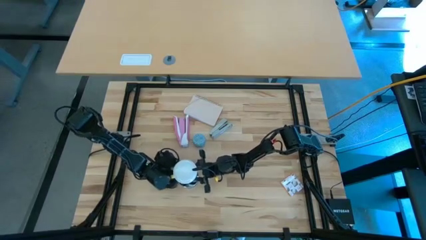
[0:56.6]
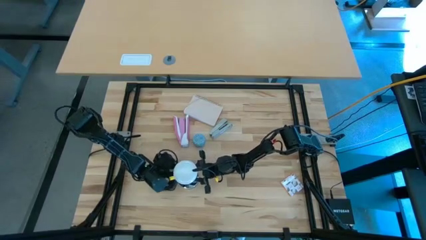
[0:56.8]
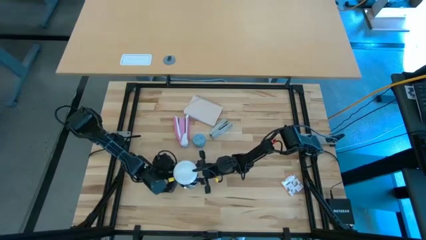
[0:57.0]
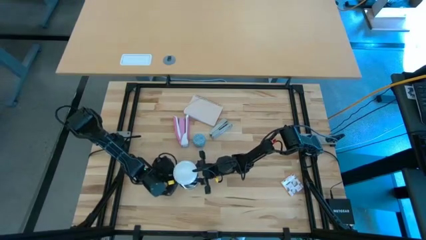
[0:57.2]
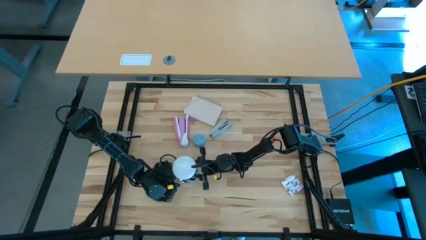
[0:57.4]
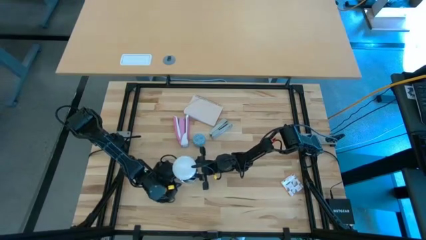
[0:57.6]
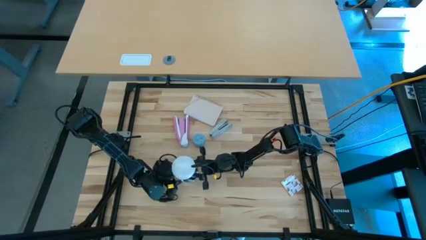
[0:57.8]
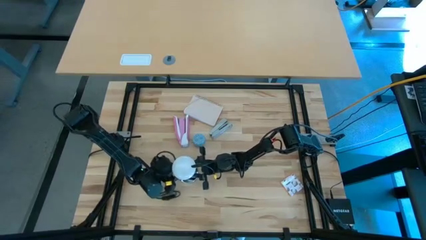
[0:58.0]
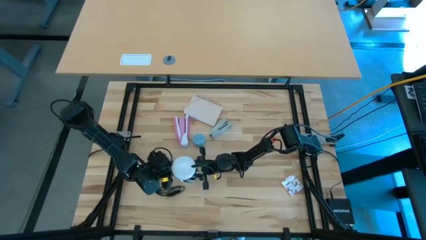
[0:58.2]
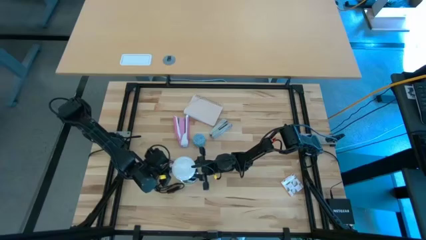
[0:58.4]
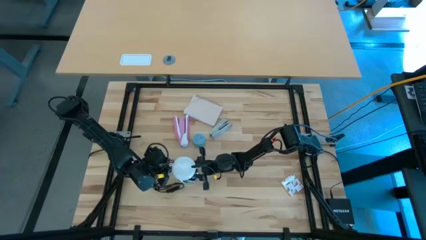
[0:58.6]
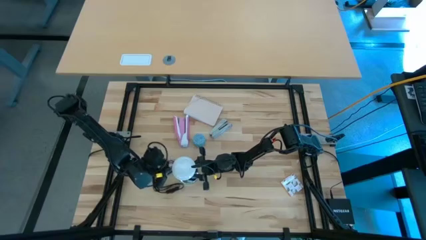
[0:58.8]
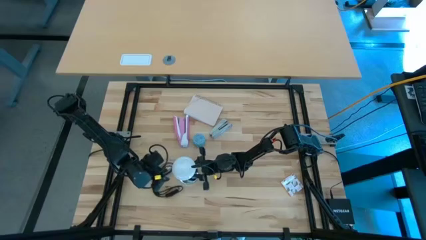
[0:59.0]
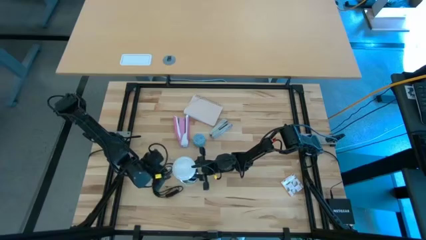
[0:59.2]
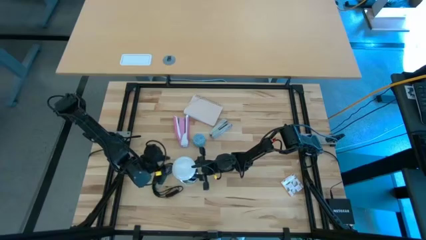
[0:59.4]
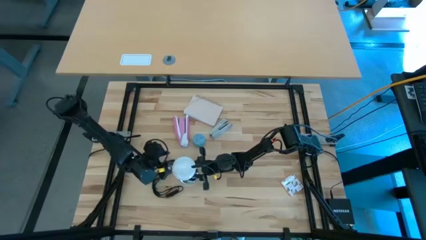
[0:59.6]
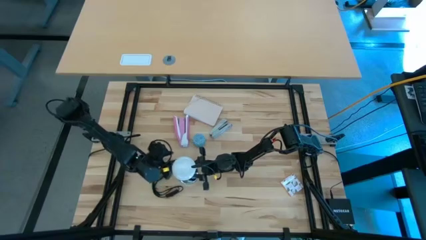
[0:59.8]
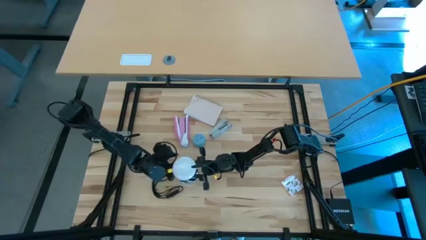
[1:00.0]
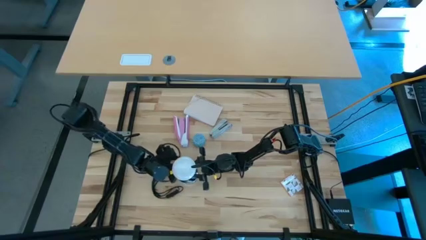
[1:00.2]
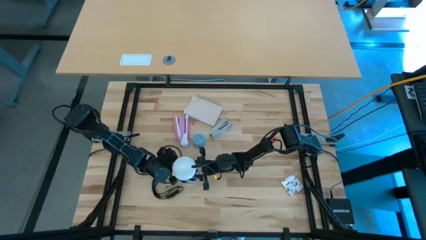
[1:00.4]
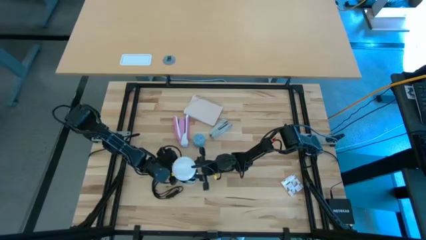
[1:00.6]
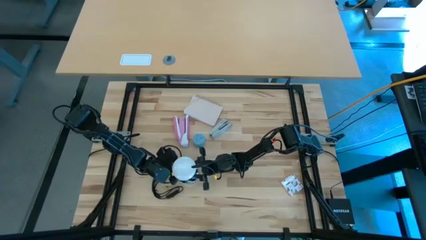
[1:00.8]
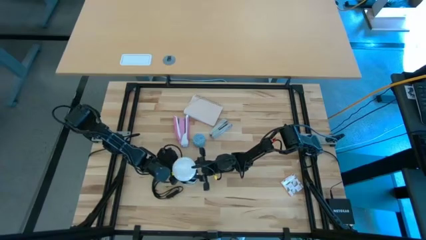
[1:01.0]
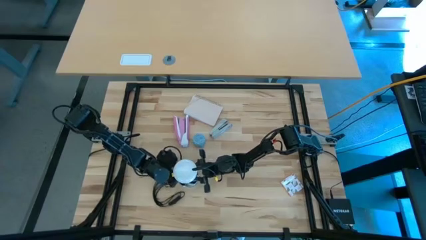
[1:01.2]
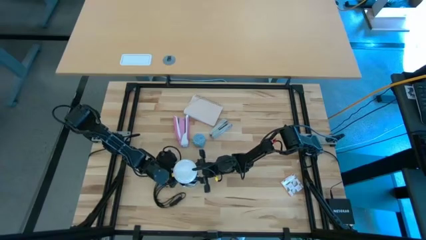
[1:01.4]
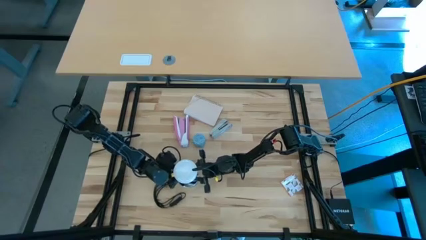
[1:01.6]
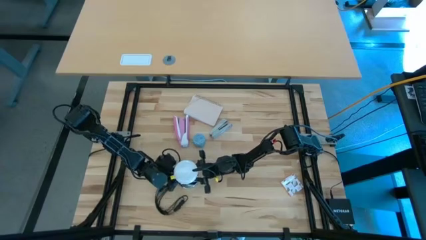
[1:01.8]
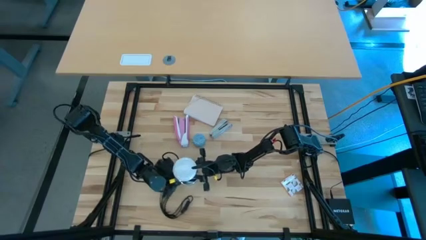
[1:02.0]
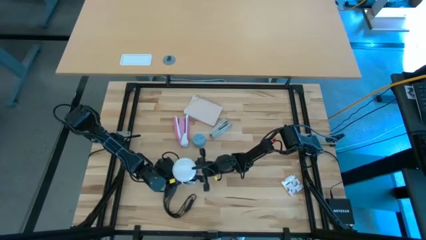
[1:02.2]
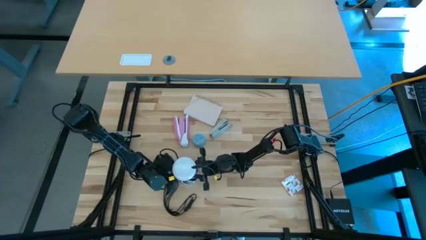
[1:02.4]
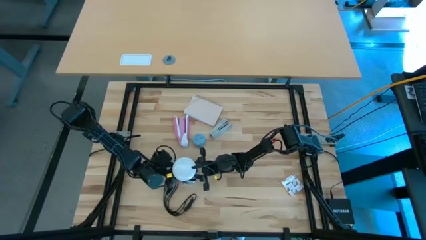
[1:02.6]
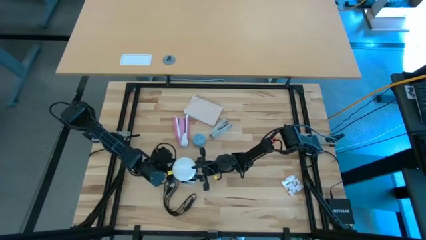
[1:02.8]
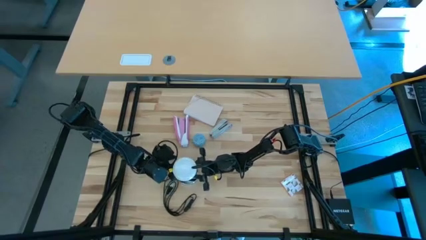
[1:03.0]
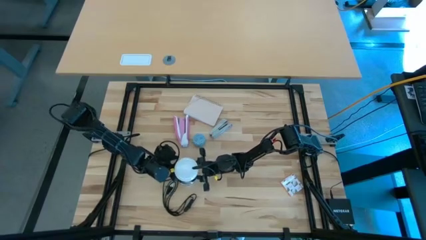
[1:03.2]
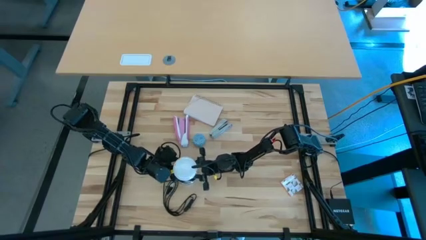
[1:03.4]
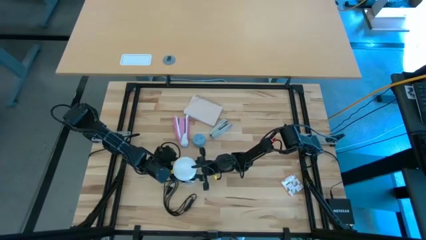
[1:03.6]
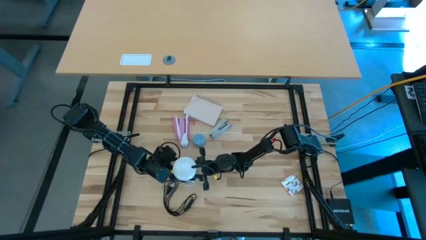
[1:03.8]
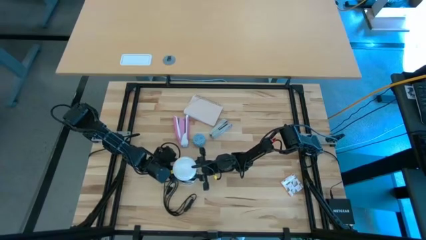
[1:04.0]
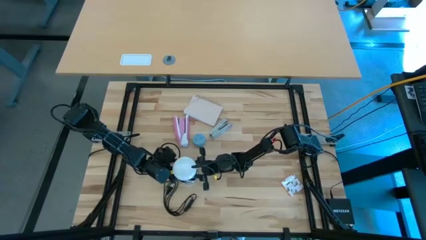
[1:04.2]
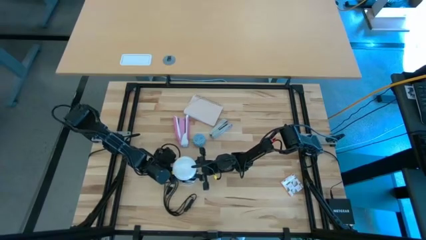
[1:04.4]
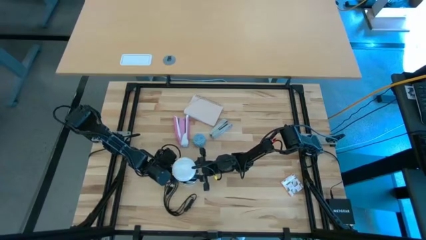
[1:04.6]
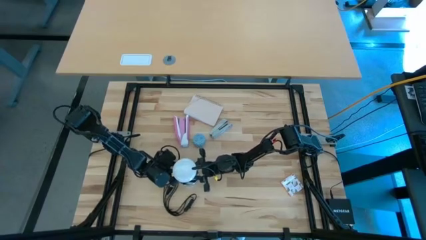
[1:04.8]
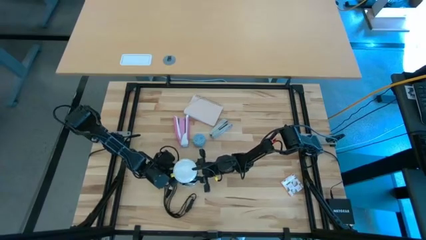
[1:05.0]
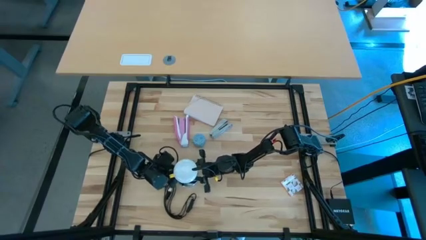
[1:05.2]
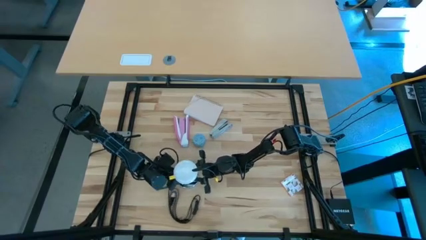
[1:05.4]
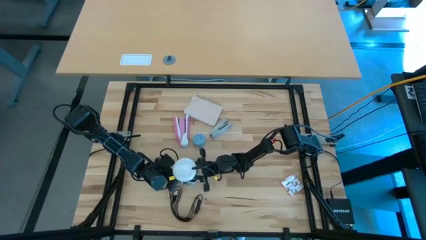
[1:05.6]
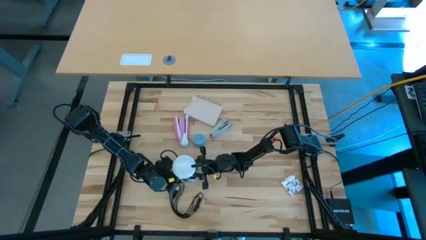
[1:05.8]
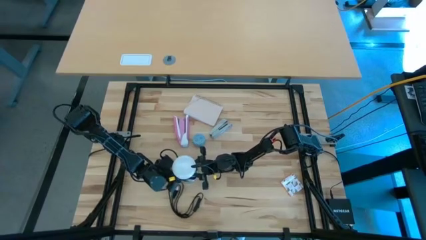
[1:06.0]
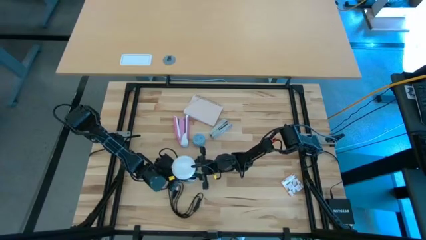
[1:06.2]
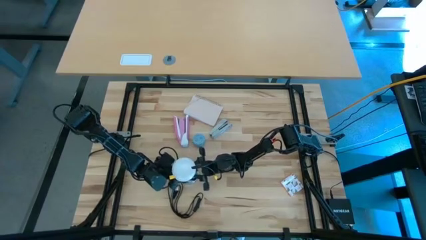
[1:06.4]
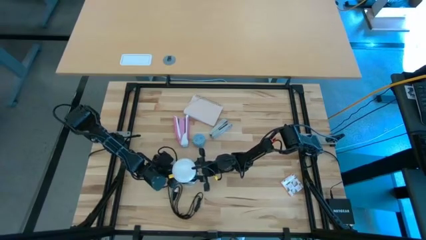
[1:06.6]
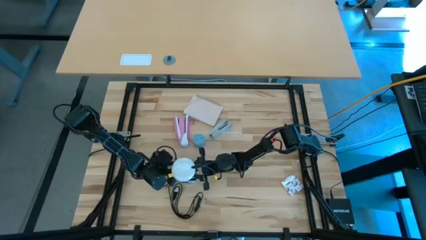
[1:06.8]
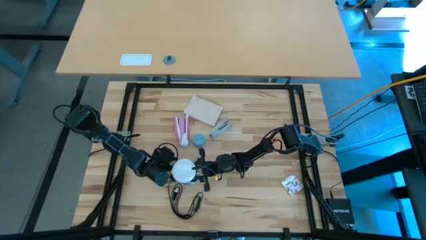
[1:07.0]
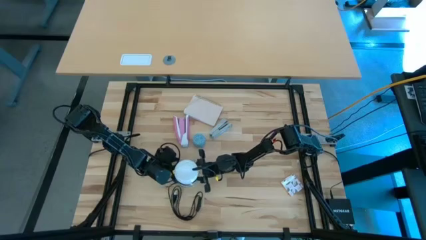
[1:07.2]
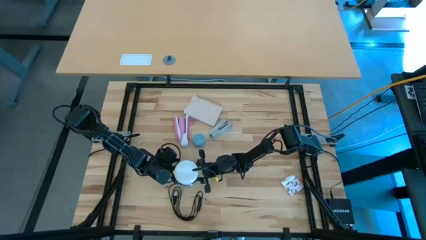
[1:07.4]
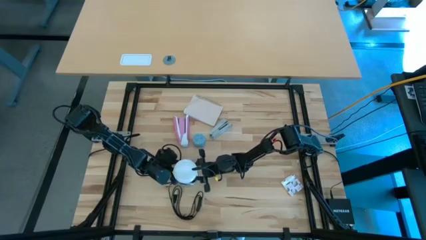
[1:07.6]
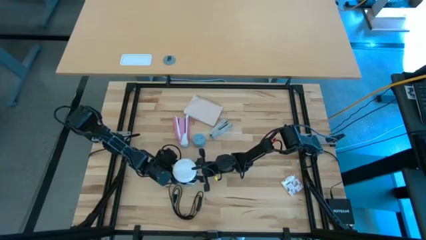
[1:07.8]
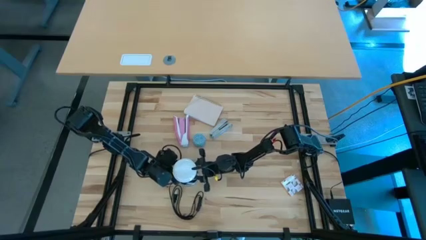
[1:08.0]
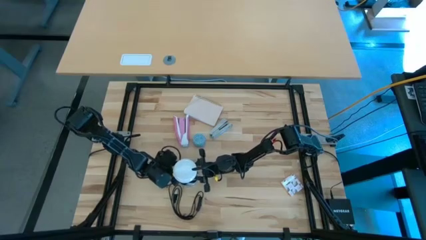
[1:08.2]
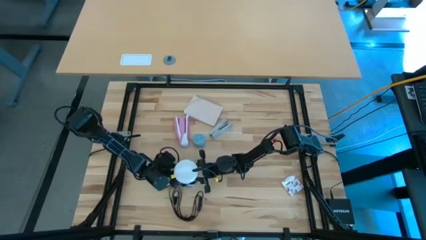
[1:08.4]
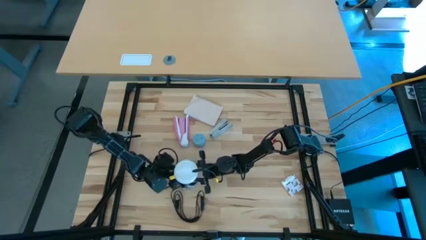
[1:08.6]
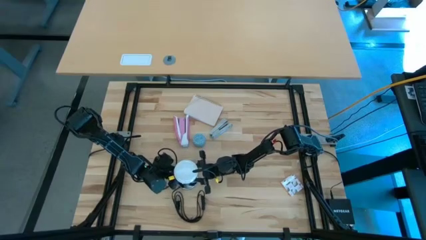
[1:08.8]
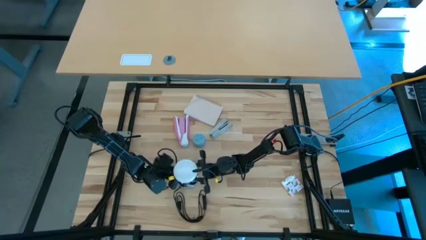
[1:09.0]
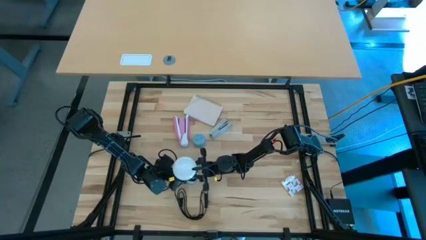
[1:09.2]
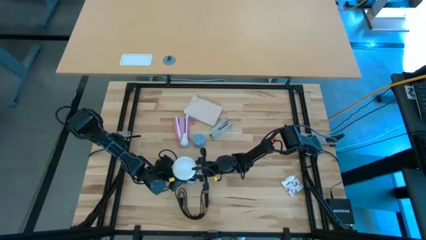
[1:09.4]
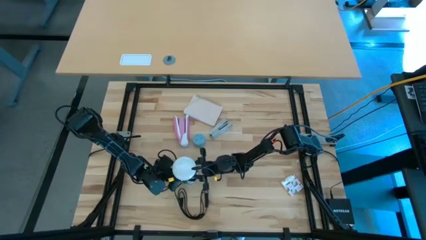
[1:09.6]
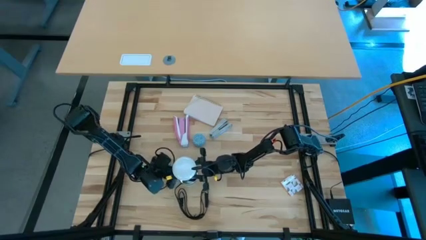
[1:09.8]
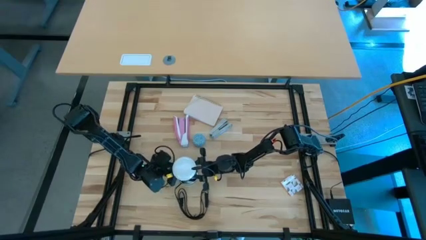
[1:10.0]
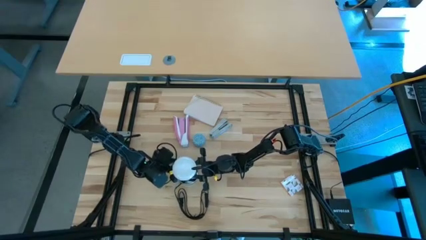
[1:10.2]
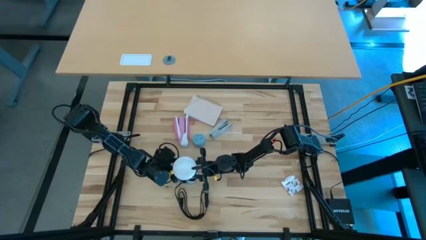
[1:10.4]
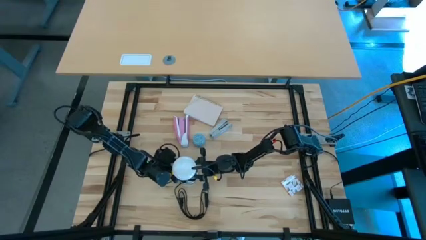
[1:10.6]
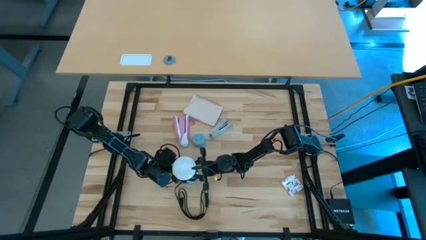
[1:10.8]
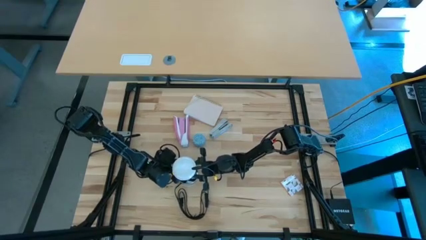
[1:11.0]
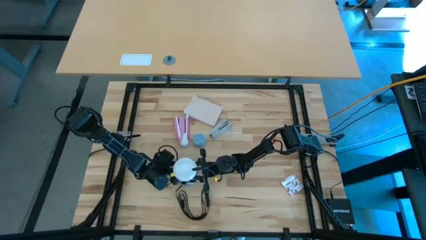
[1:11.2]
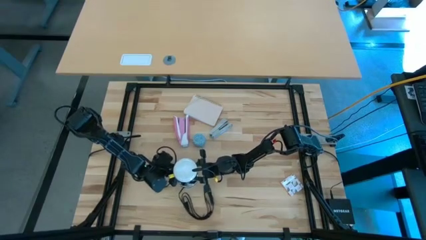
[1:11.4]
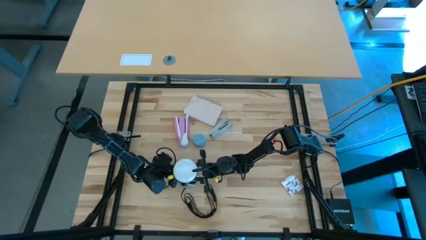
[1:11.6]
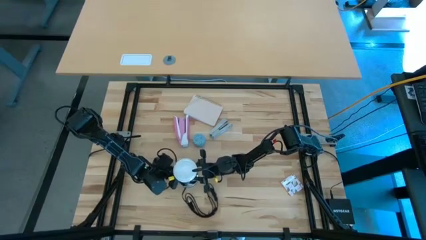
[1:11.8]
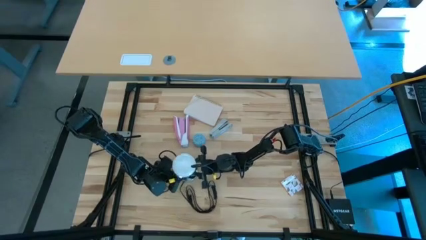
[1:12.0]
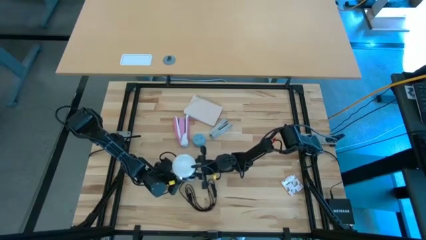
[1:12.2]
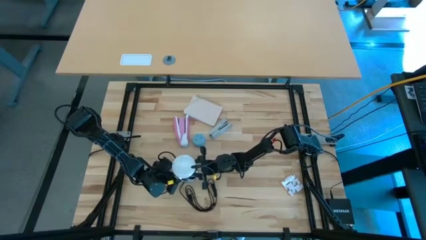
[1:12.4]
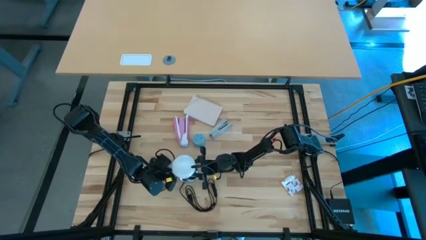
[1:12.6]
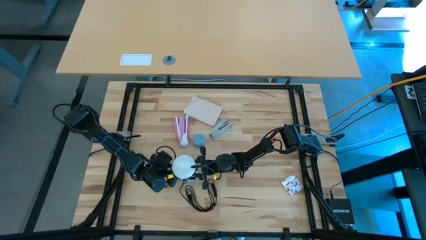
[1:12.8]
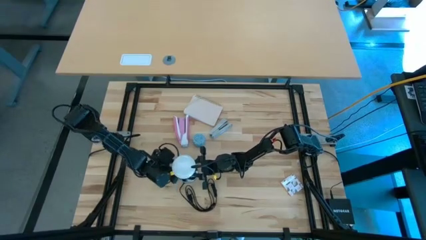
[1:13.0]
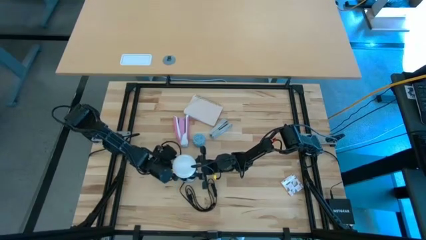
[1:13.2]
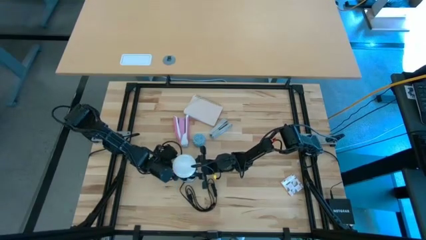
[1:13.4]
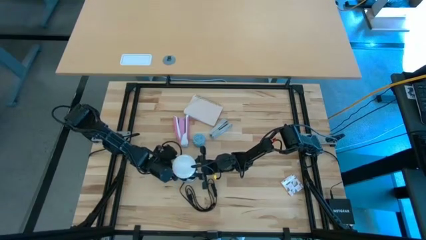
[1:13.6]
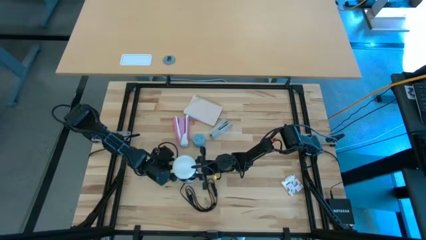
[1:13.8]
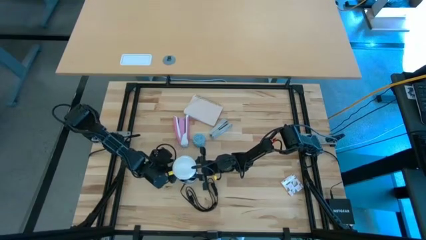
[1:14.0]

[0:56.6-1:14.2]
Task: Screw lightbulb
Insert the lightbulb into the lamp
